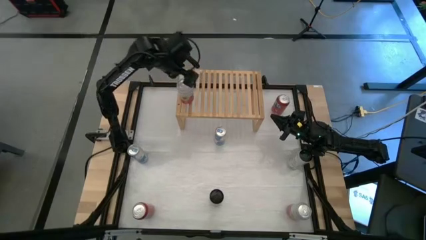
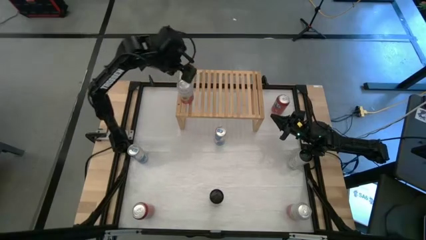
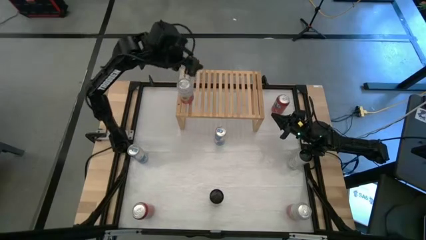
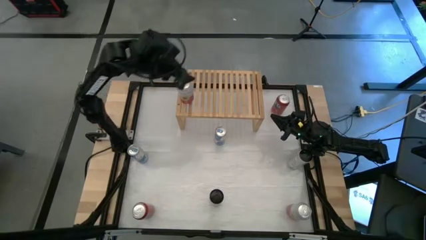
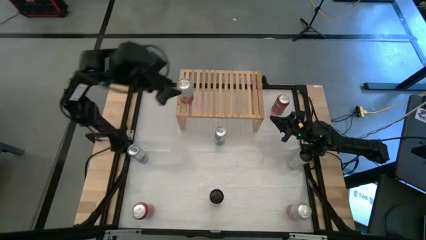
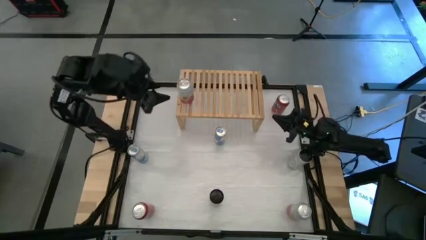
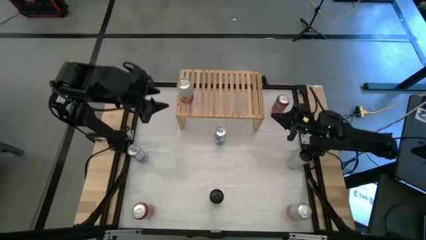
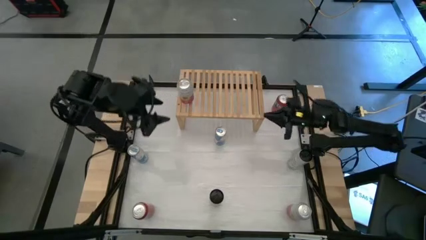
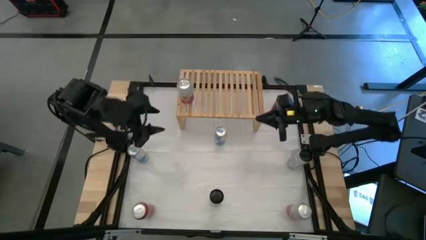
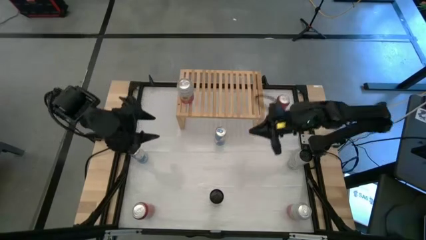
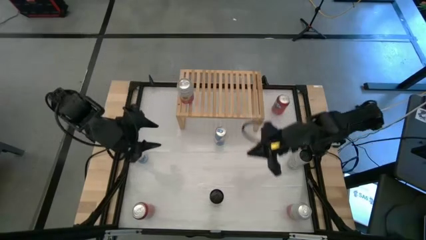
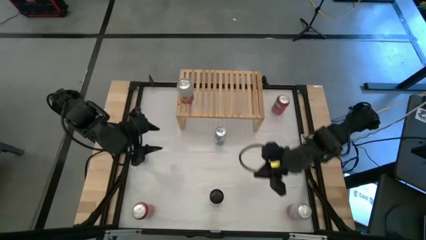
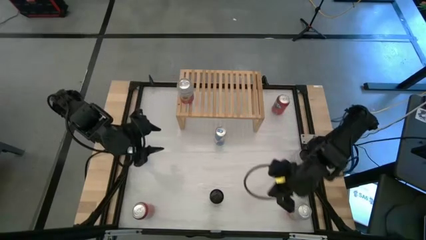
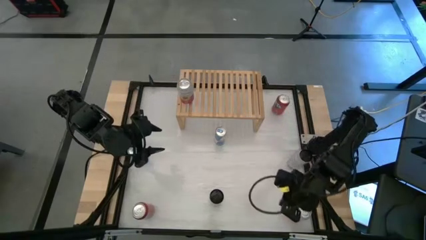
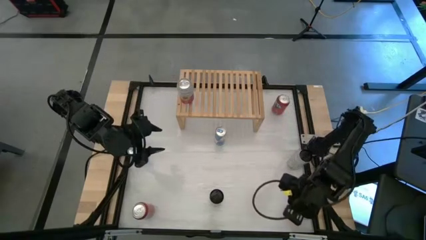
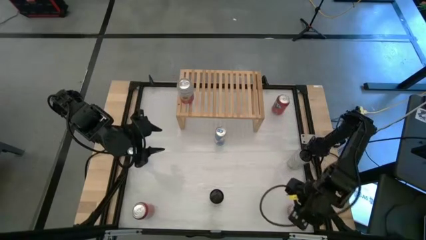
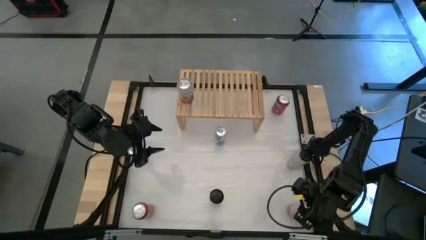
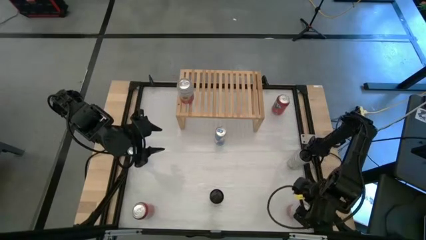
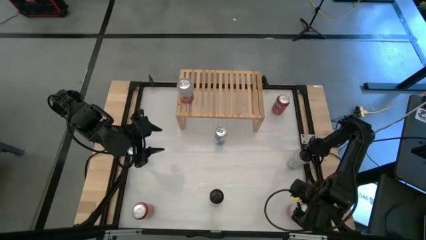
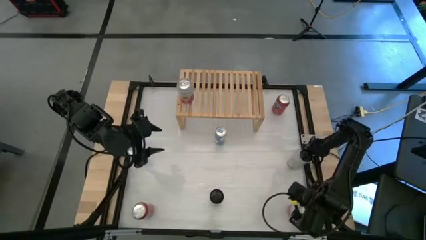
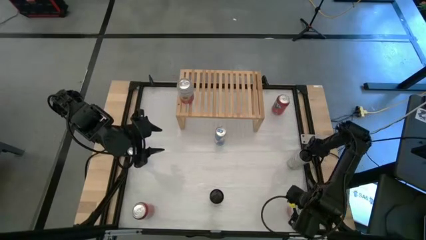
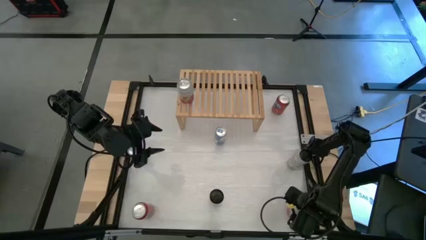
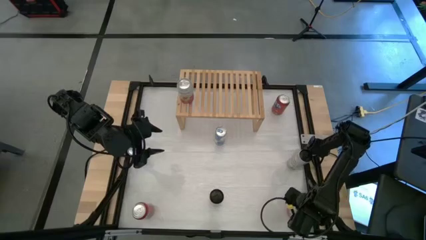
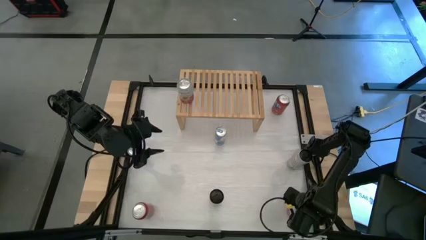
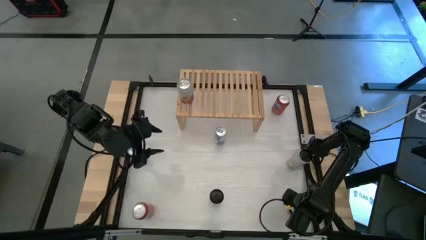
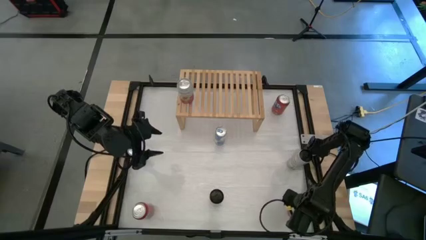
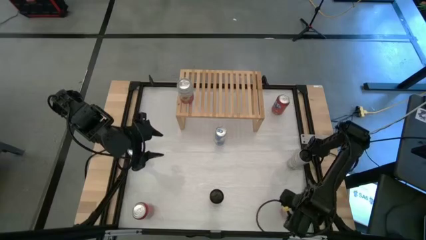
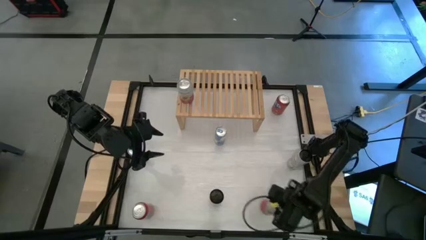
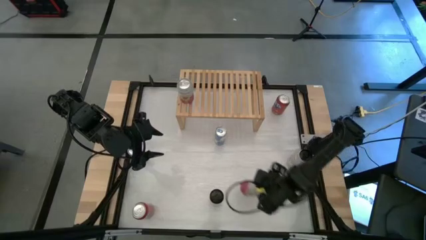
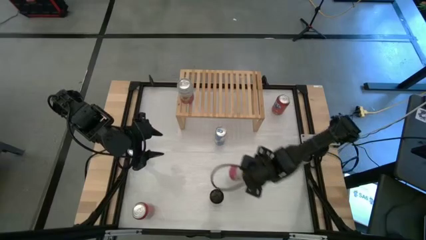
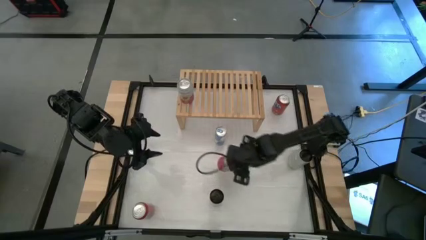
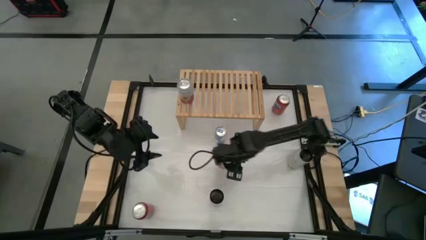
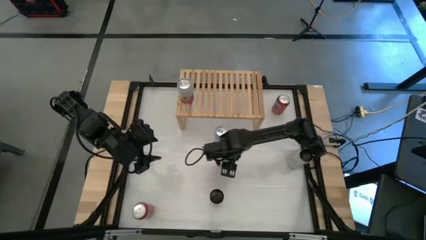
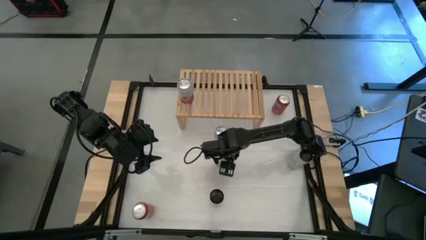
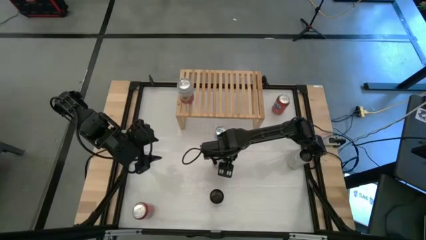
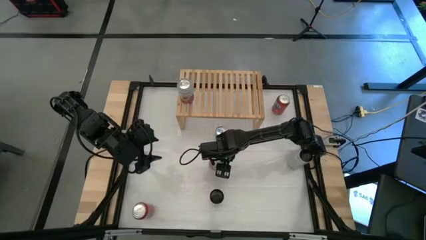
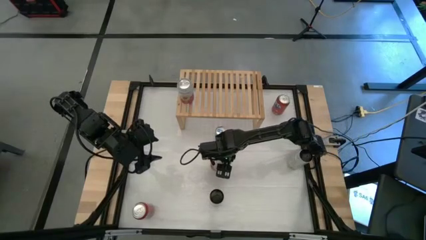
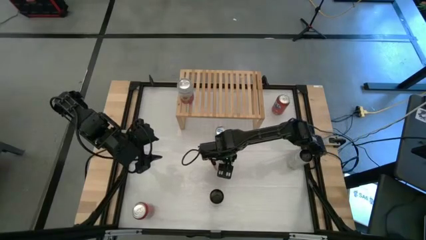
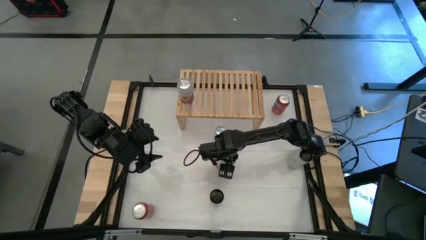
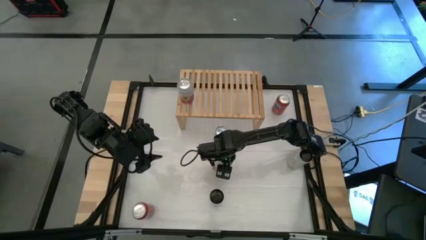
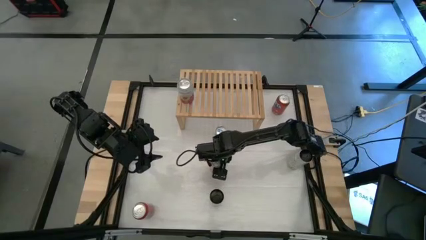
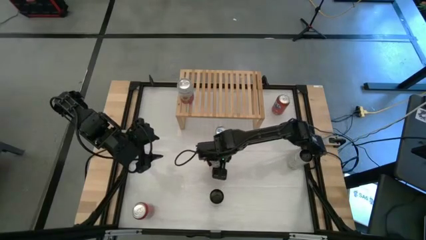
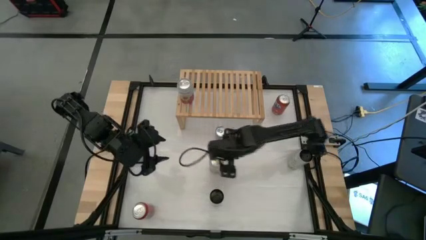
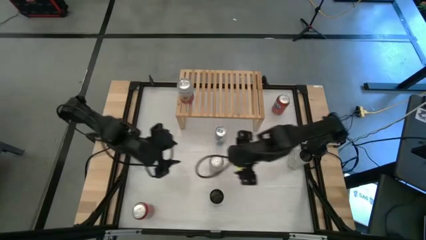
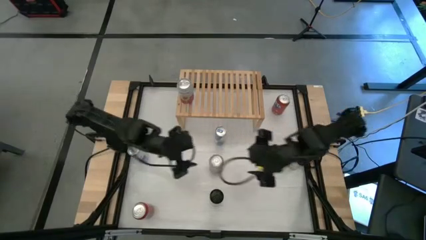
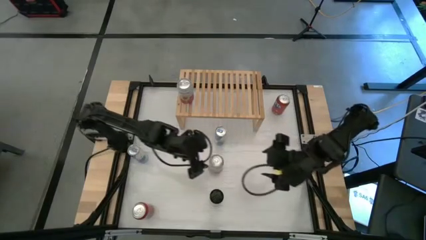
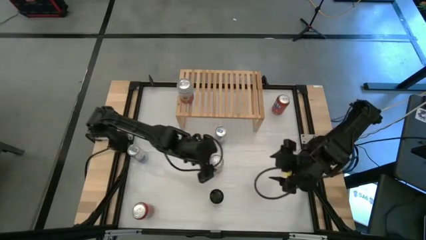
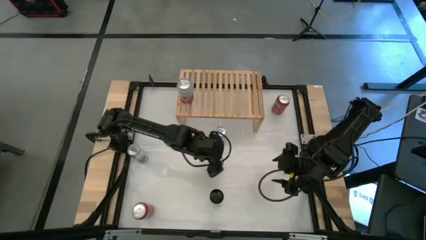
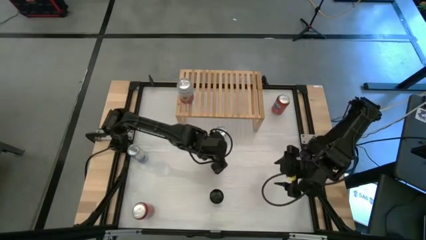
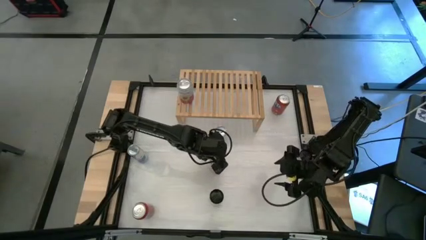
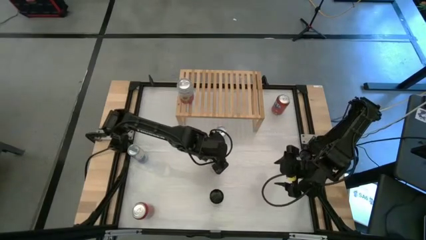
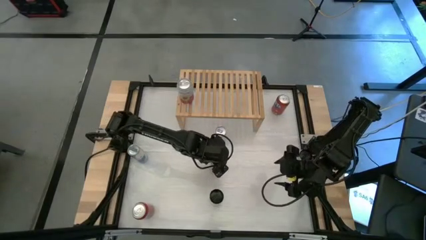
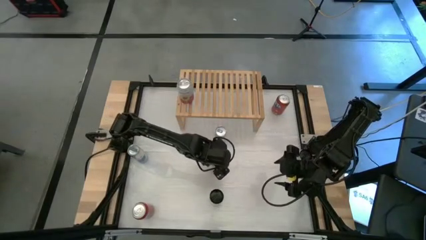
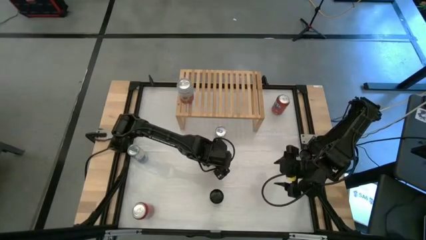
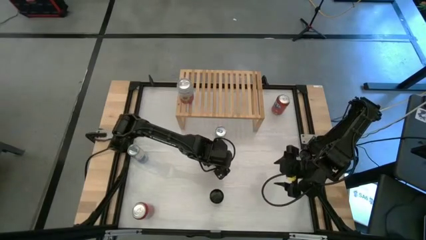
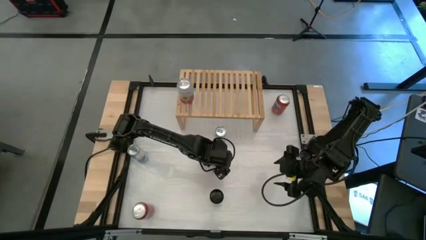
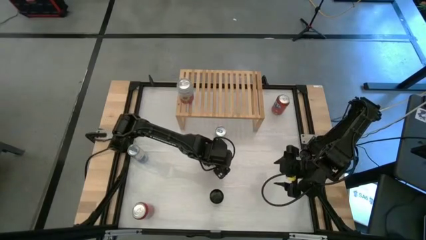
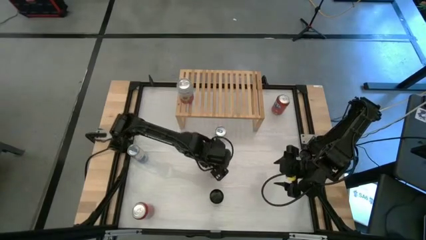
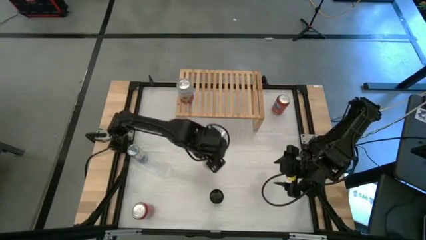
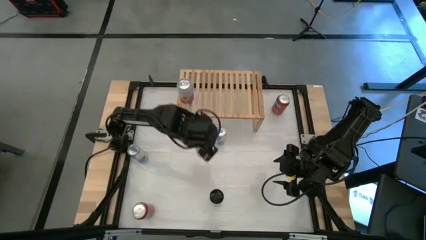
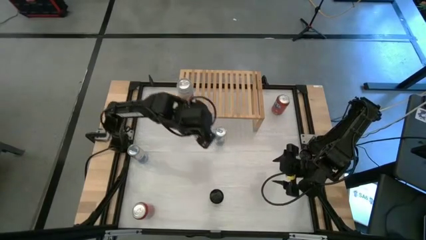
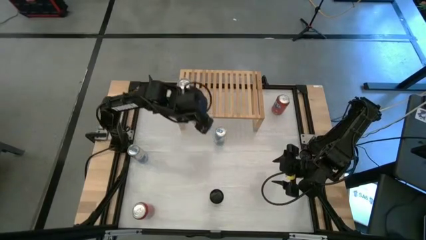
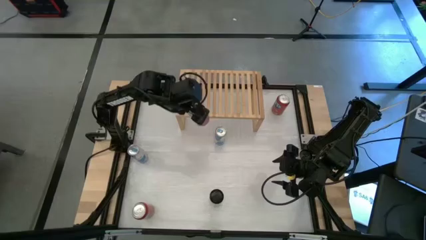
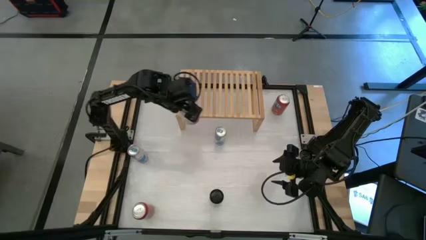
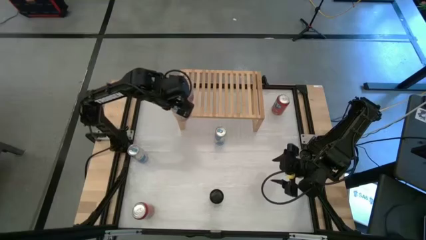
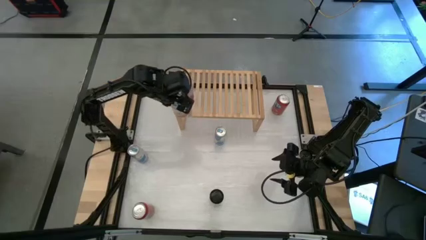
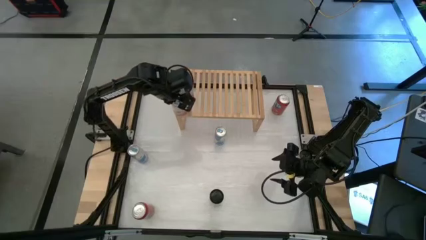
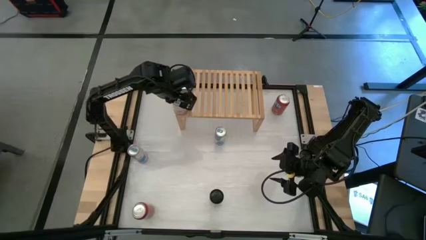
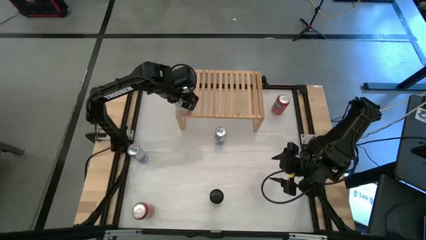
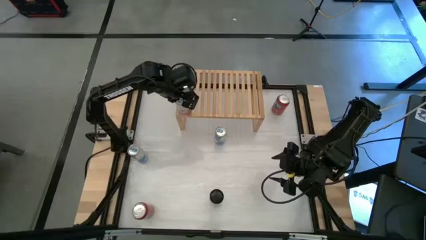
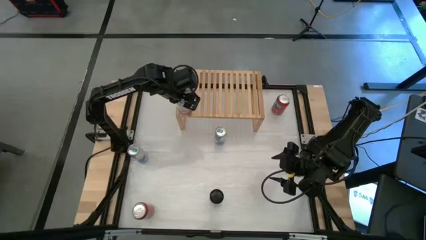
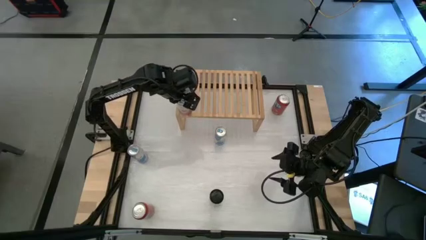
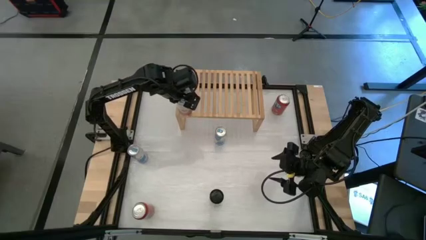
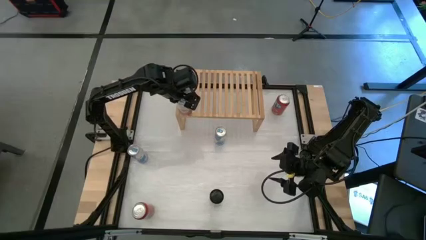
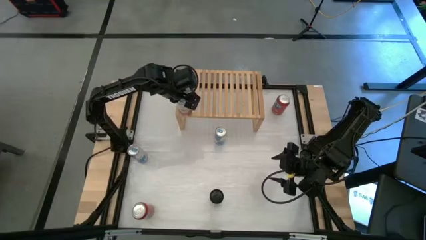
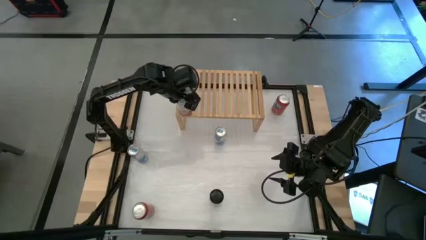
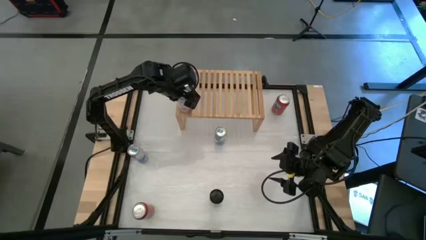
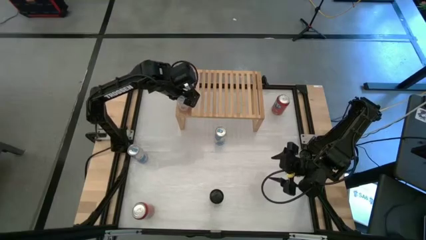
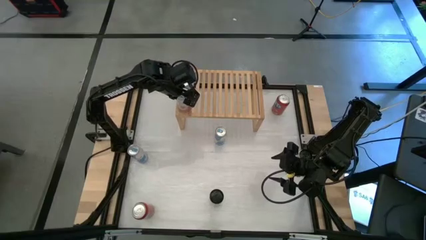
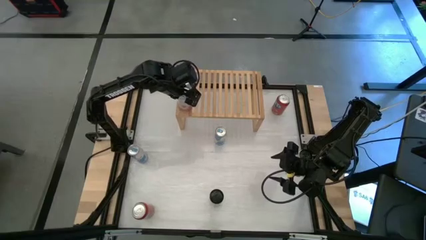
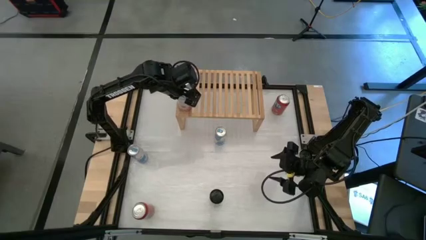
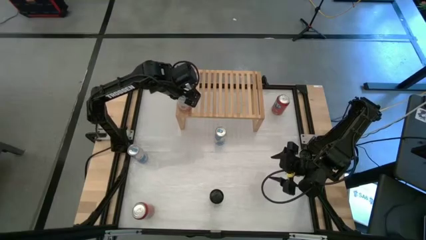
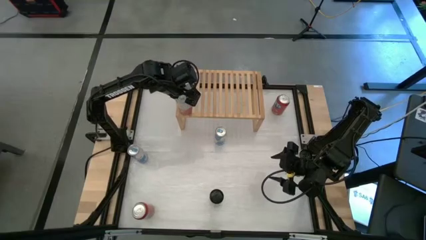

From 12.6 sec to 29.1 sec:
Task: Place canned beverage on shelf
Put the pink soda can on the shelf aligned with the other pink soda can
